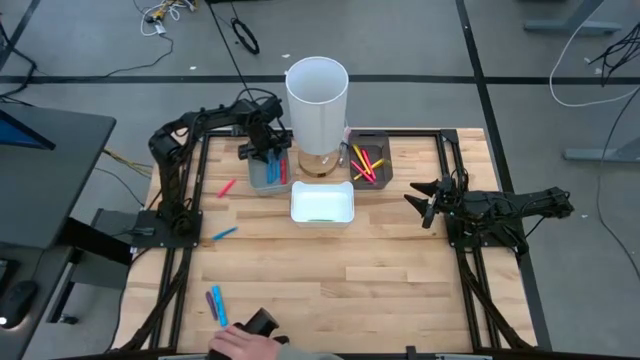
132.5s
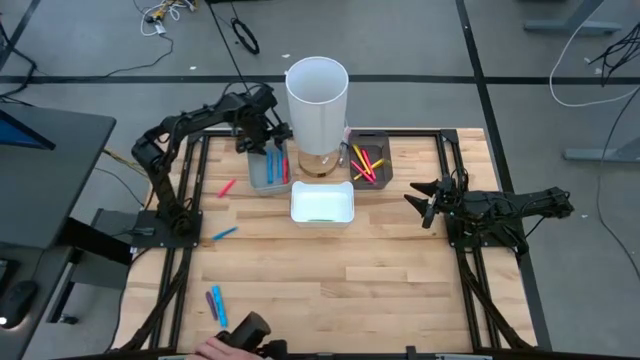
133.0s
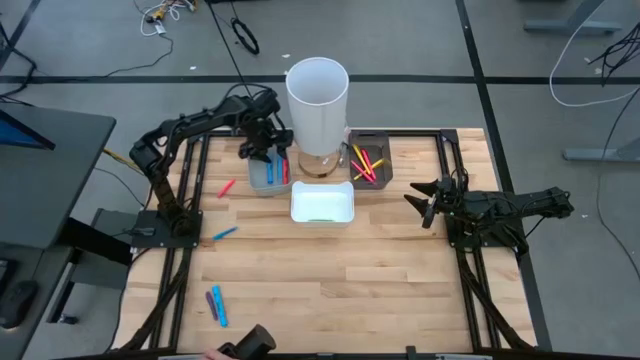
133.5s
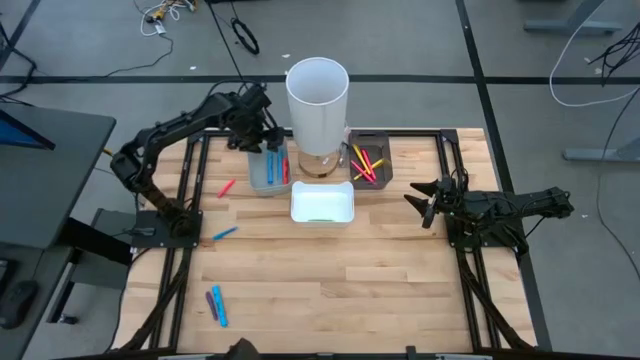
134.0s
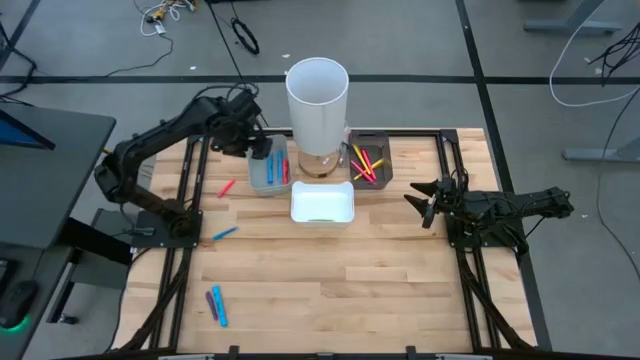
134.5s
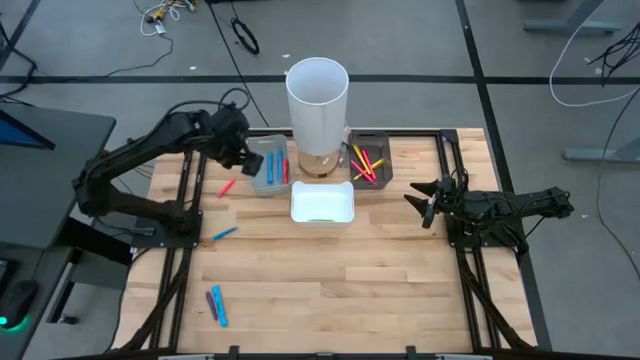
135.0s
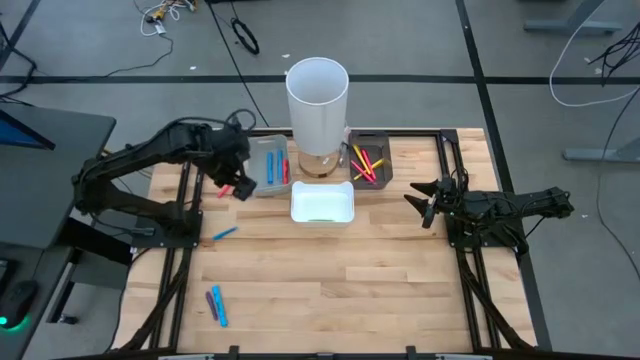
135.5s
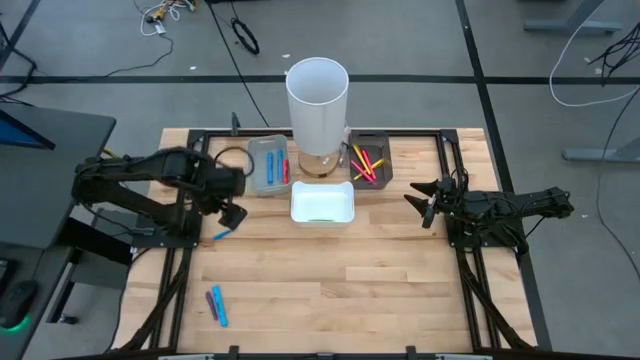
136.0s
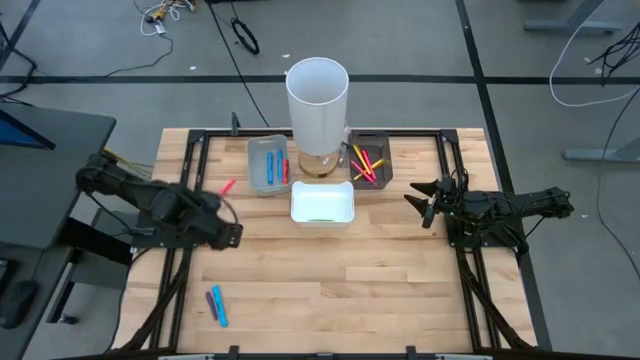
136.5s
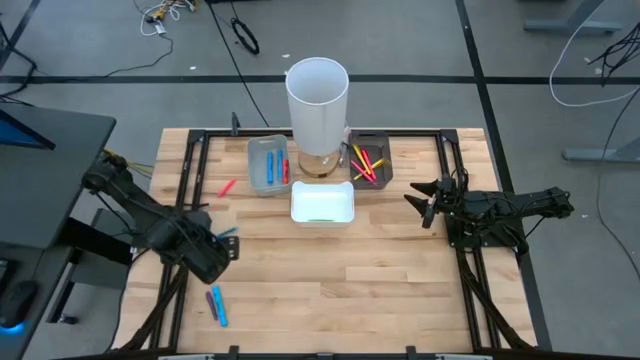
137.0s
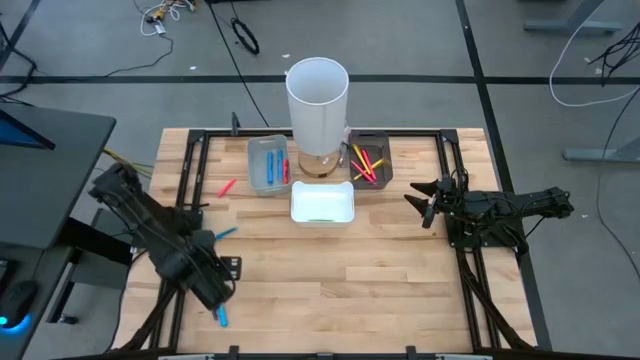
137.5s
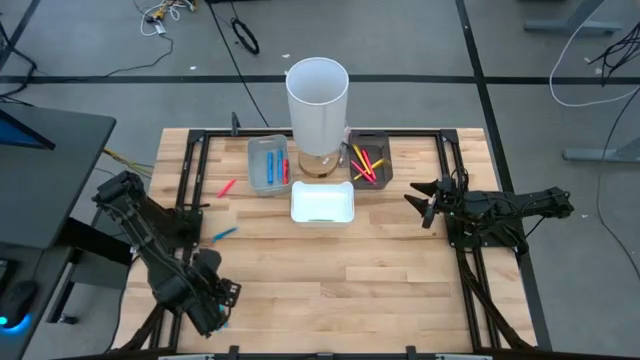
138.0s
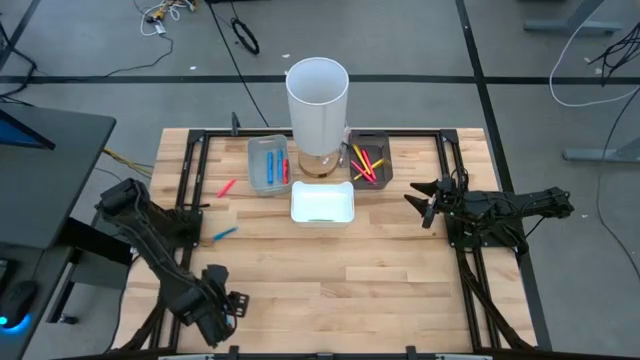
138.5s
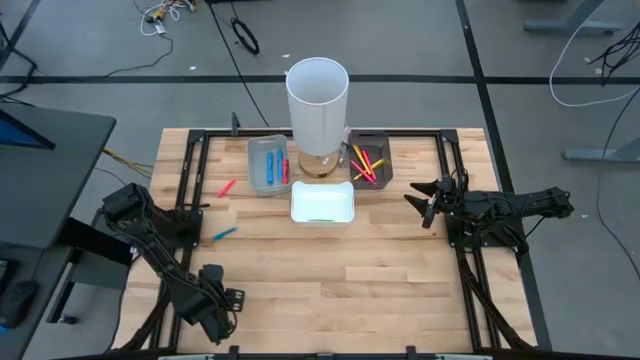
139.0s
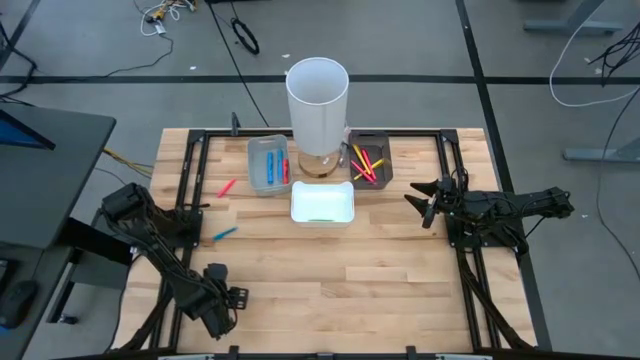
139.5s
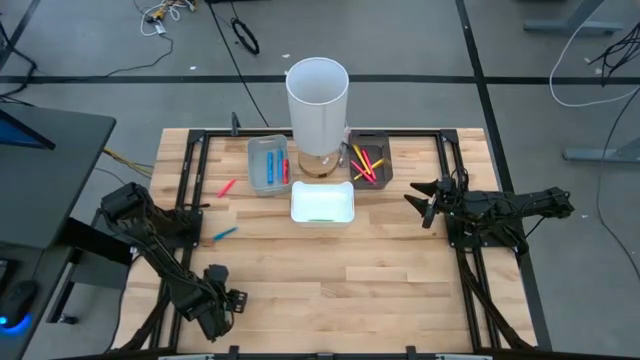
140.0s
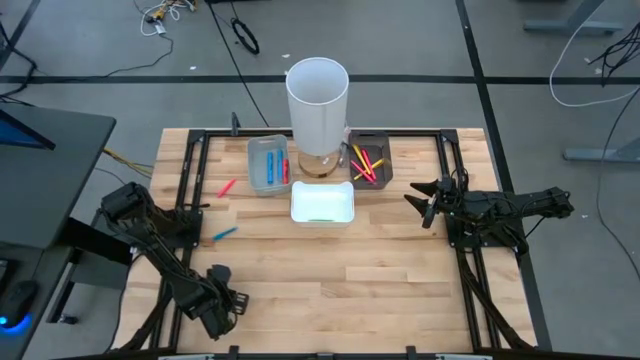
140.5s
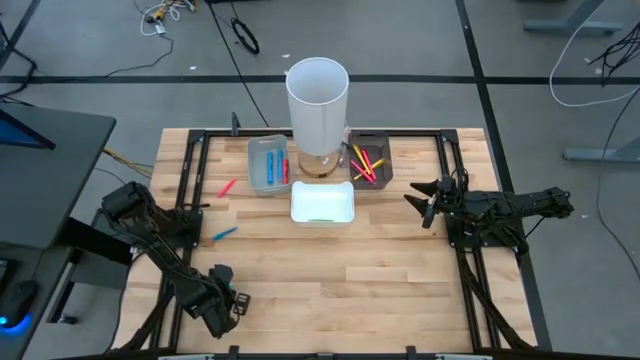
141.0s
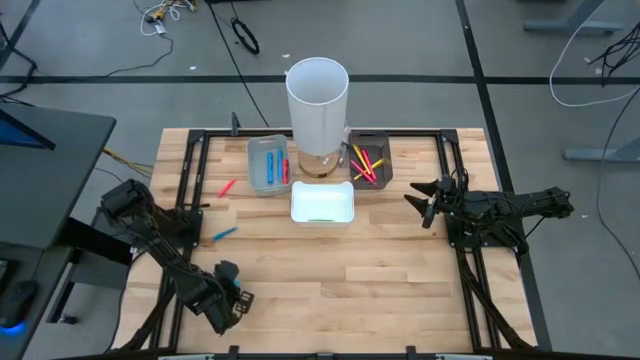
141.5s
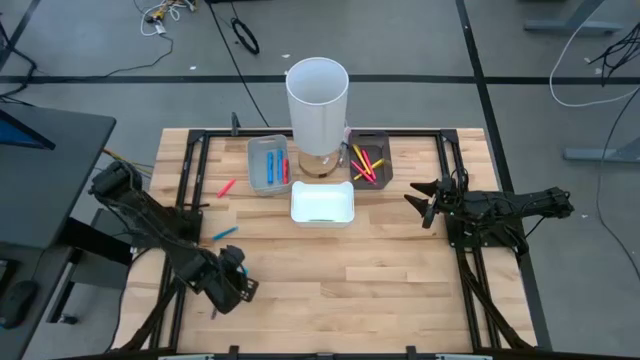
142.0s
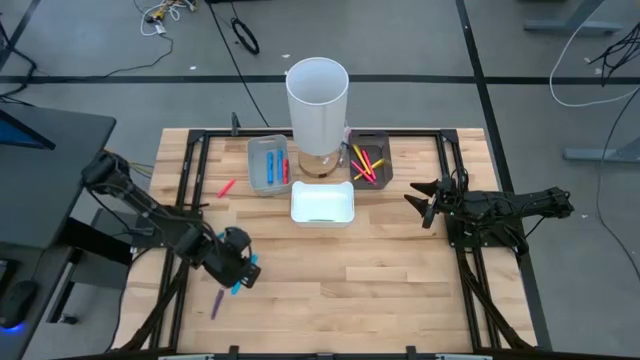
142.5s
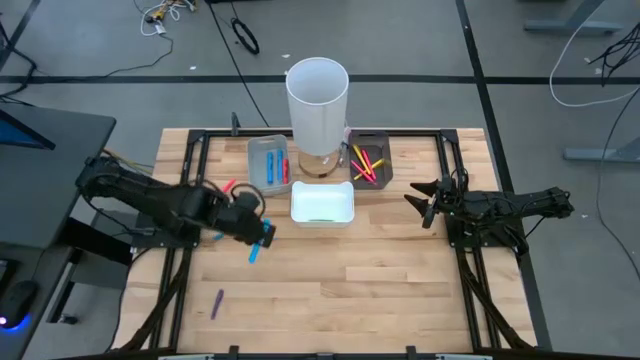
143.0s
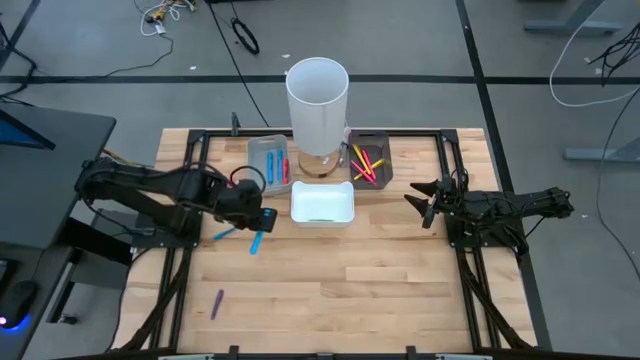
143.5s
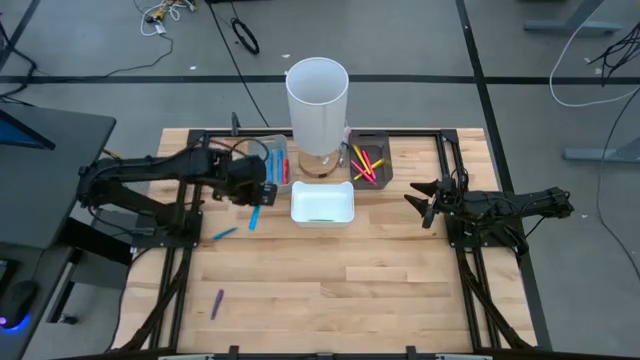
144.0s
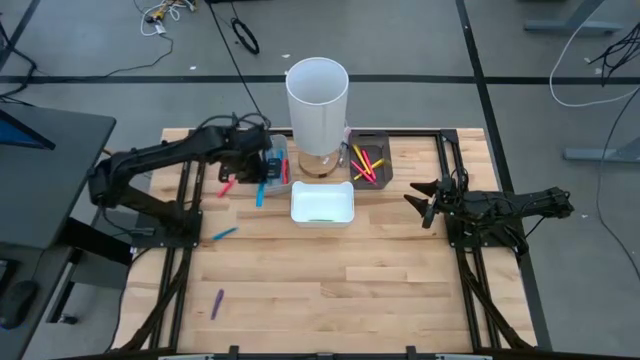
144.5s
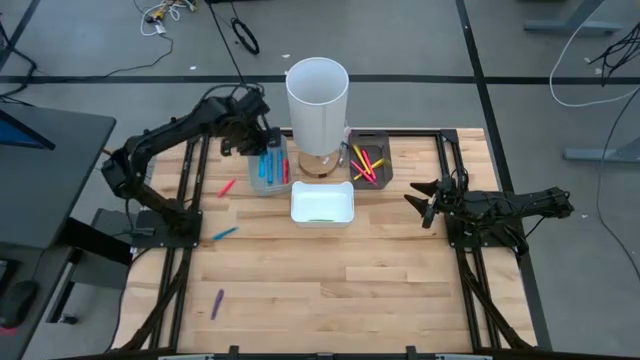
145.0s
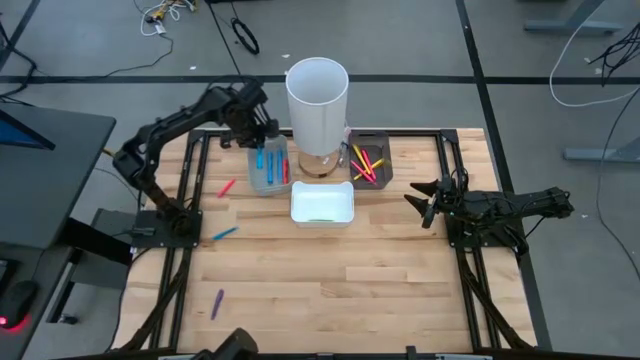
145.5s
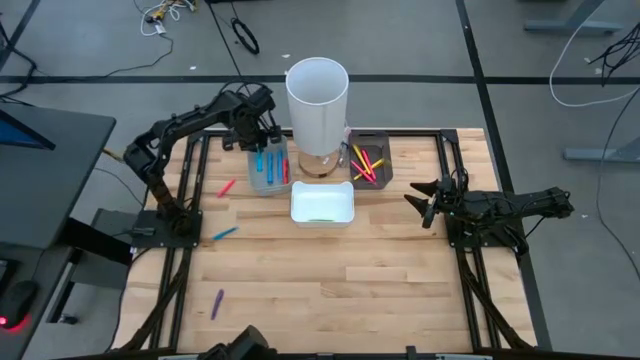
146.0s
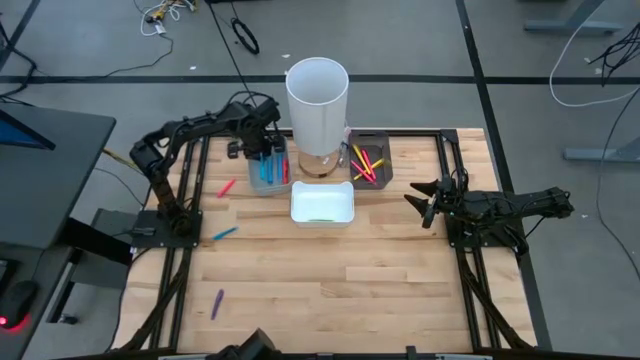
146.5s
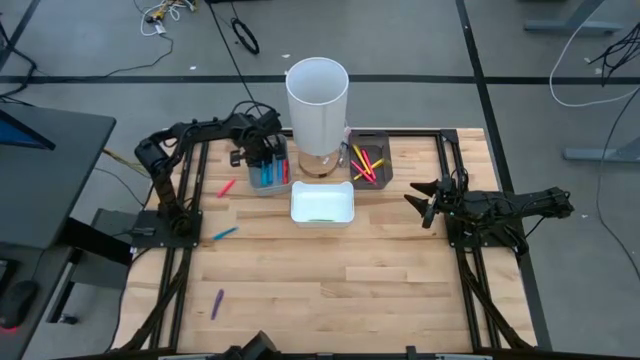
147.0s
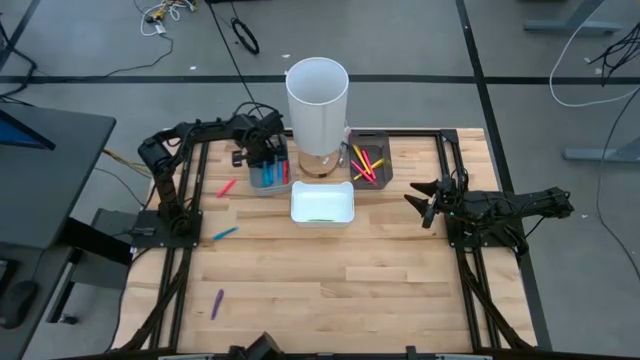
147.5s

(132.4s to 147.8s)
Task: Pick & Place Markers
Put the blue highlighter pen into the gray bin

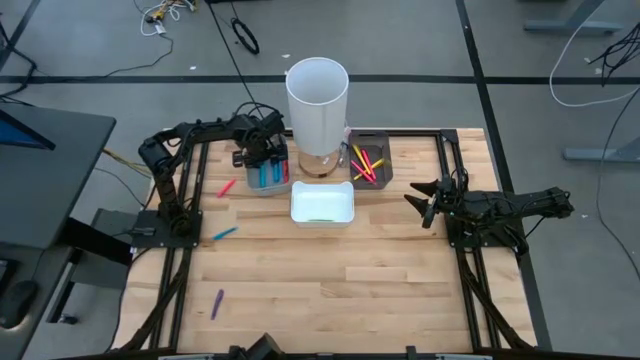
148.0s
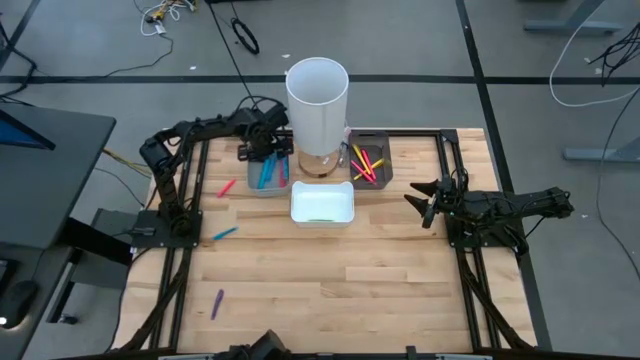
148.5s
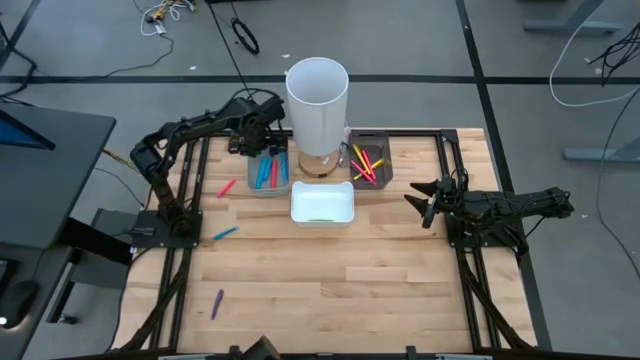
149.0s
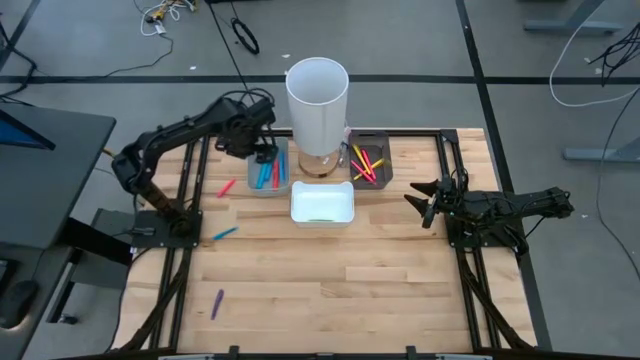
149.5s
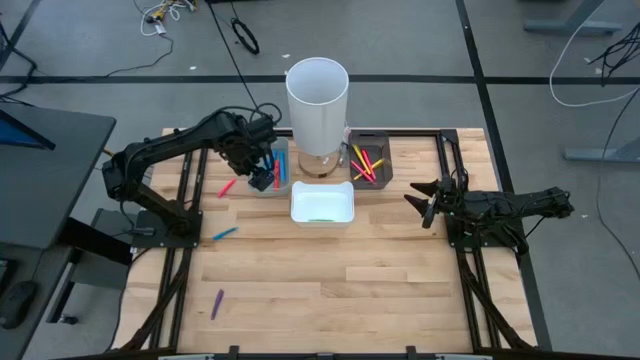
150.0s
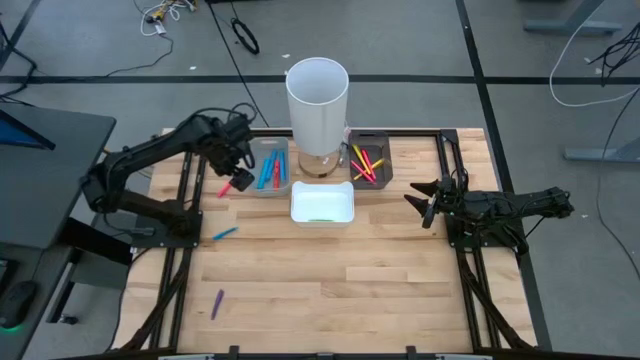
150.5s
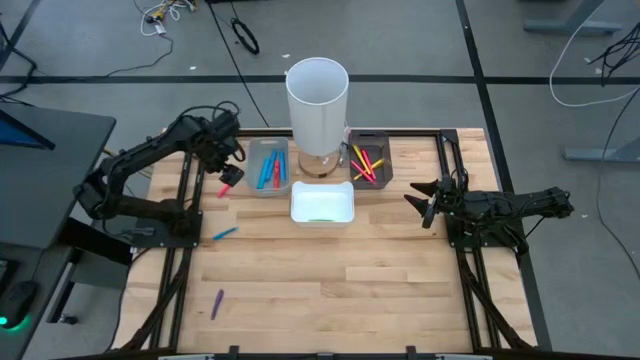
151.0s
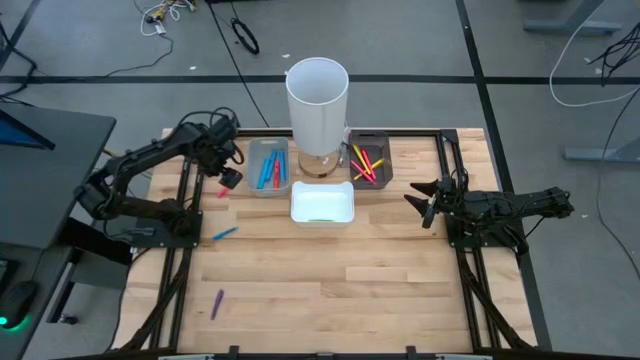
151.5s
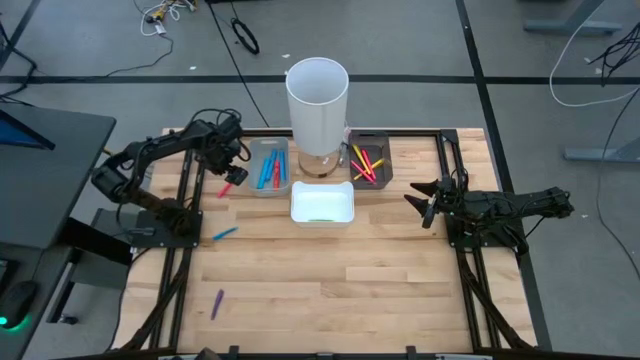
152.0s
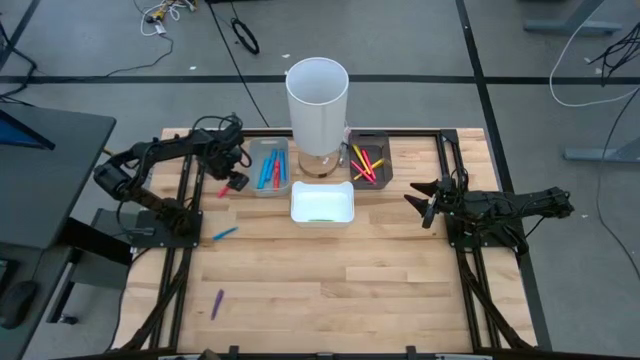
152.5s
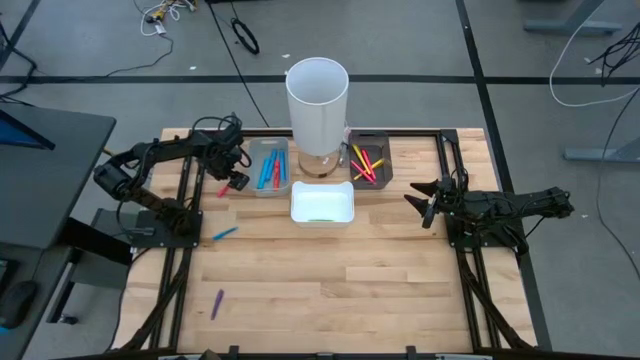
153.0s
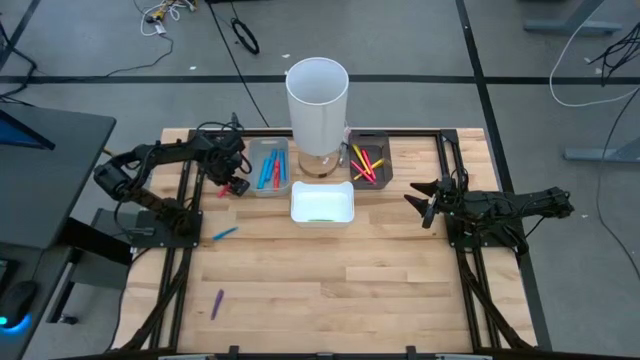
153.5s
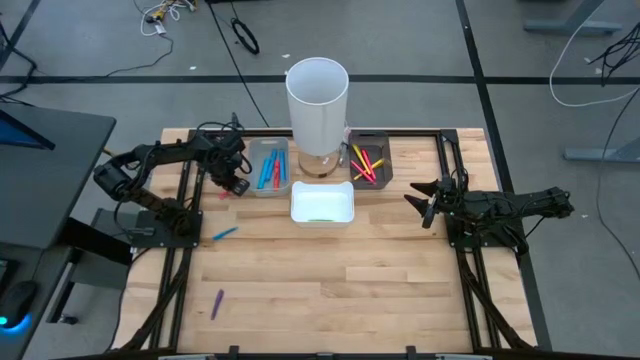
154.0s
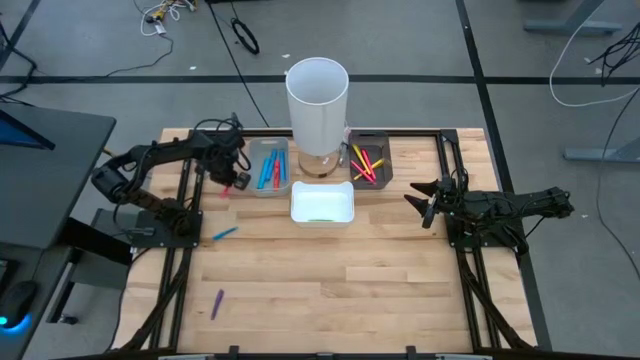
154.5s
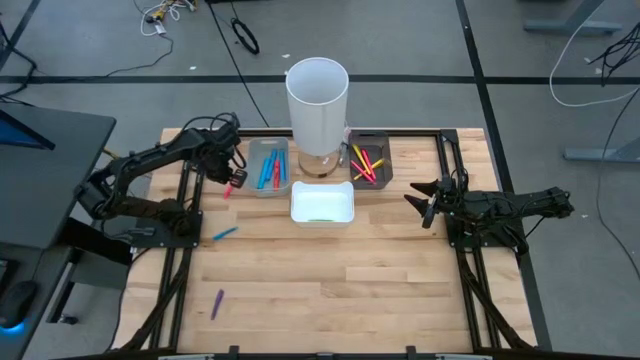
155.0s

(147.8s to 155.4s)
Put the pink pen into the white bin
